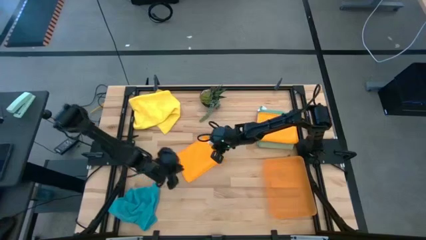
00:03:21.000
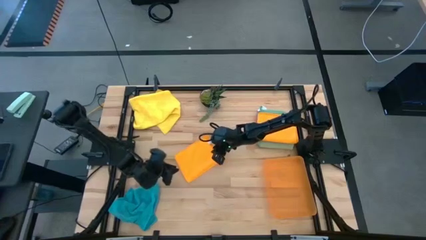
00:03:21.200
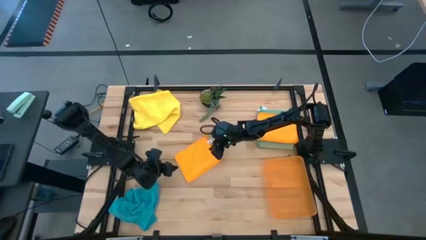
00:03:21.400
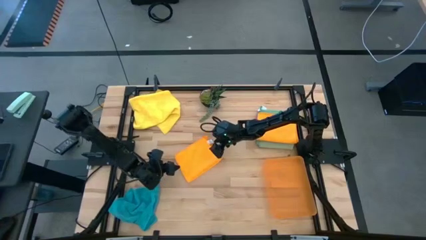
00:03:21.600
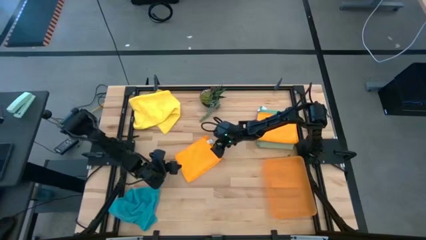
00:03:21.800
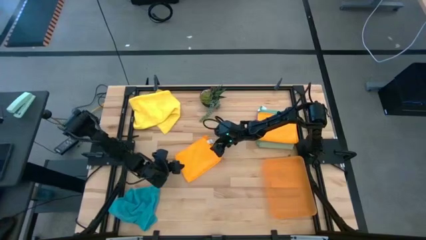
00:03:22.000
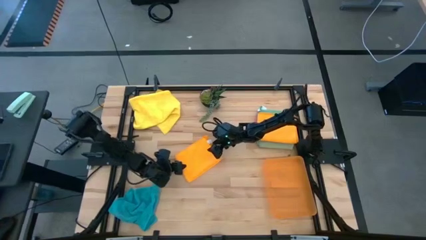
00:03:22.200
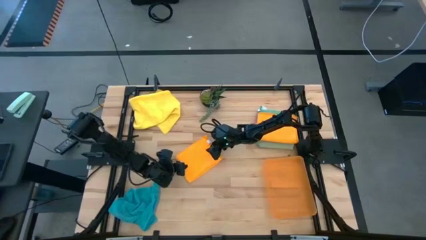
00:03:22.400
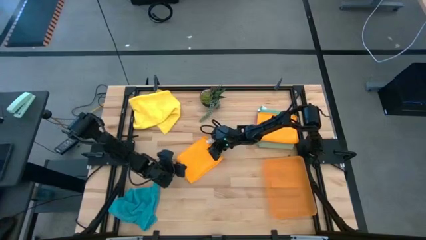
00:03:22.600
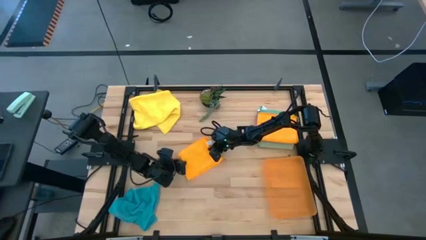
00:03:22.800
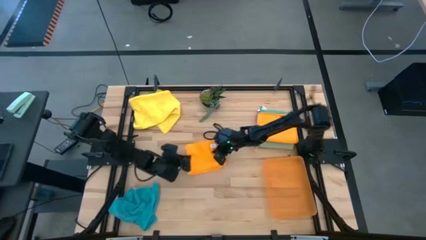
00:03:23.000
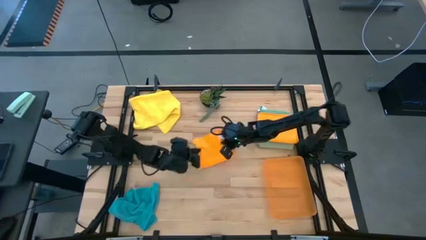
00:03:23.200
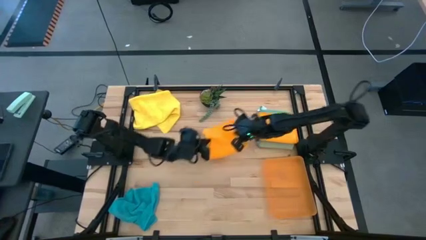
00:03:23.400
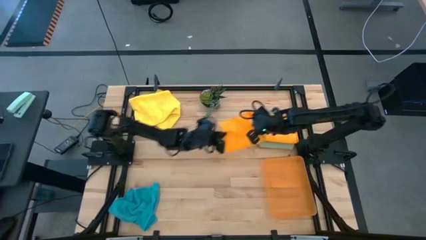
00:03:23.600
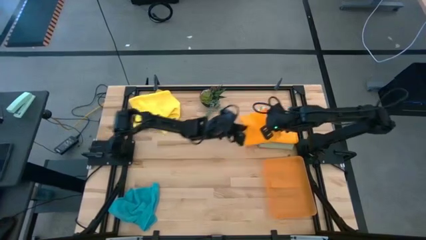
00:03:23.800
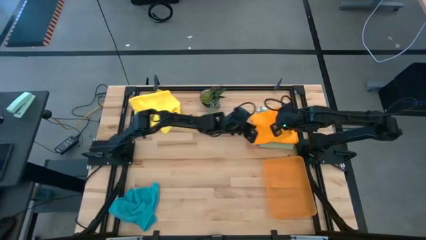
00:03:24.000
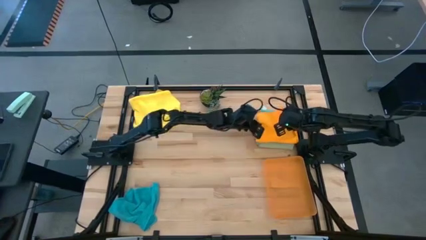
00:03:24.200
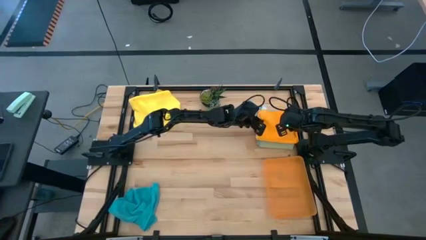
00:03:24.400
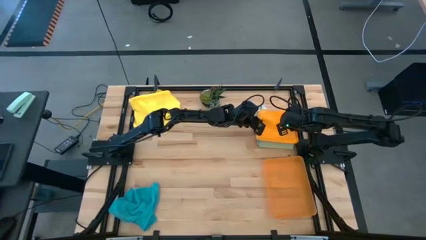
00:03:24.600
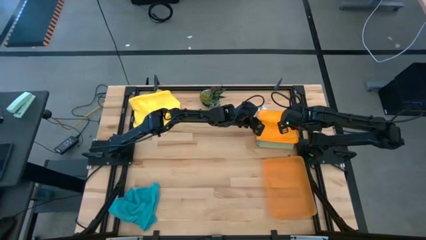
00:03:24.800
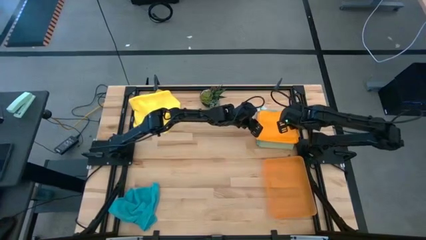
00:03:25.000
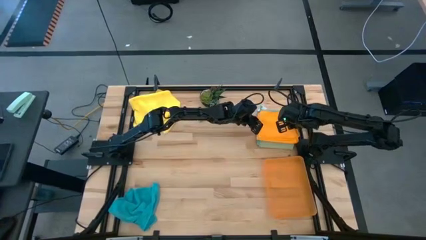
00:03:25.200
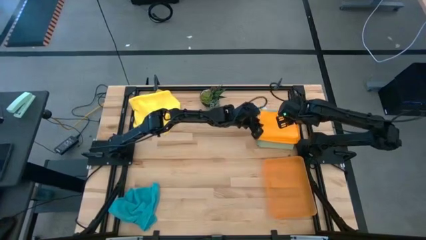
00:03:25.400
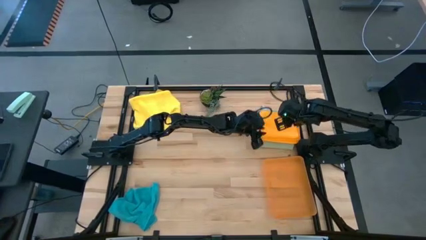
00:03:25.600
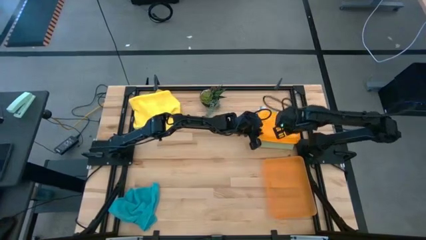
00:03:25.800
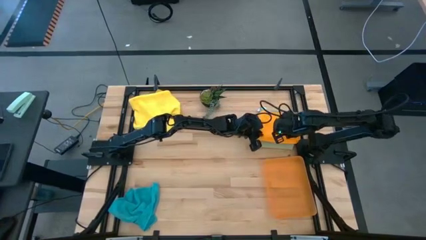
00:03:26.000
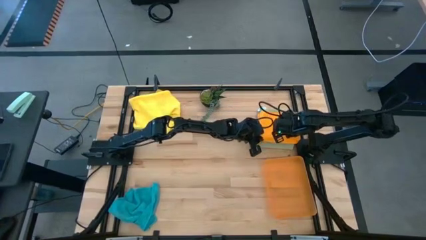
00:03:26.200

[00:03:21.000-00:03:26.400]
Task: Fold microfiber towels
Stack the orange microfiber towel on top of the other orange microfiber towel

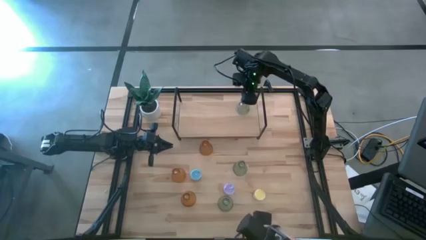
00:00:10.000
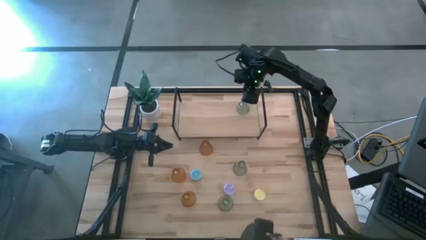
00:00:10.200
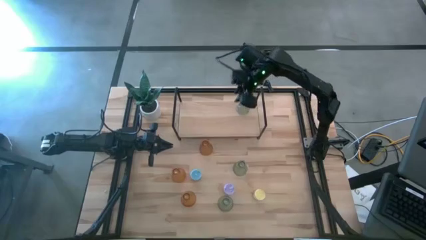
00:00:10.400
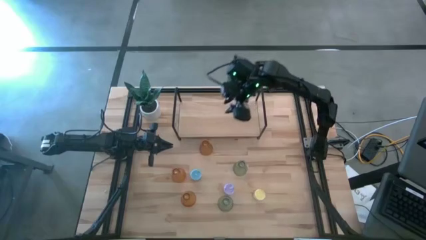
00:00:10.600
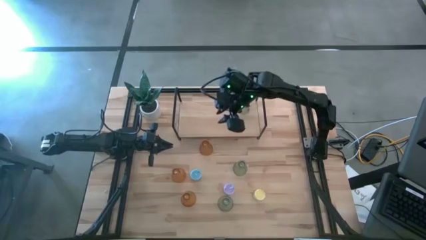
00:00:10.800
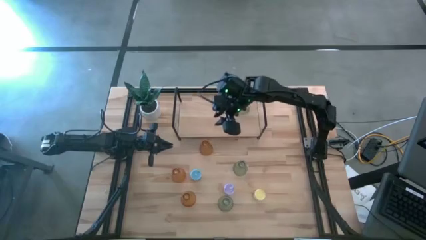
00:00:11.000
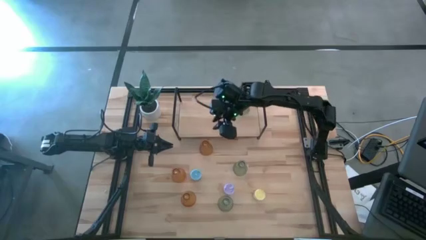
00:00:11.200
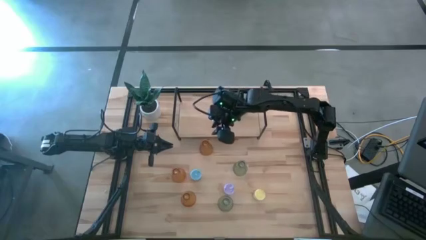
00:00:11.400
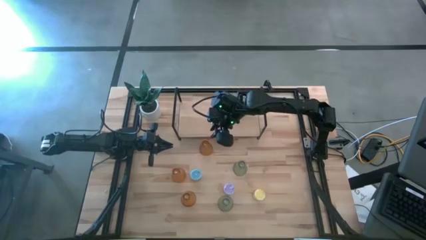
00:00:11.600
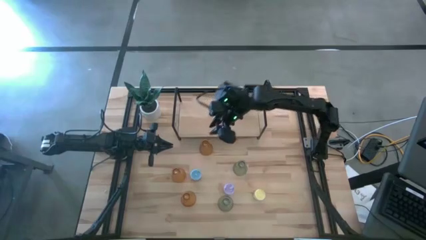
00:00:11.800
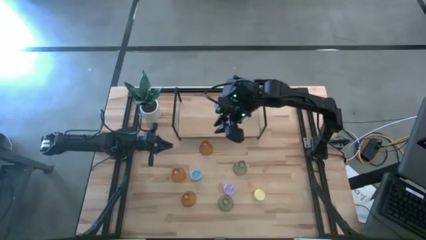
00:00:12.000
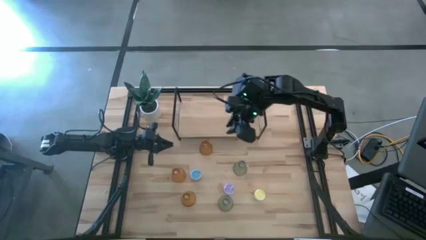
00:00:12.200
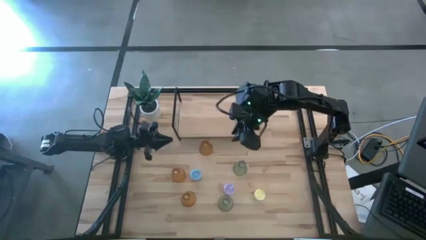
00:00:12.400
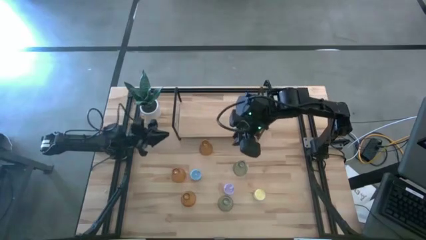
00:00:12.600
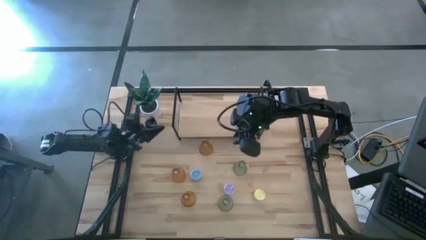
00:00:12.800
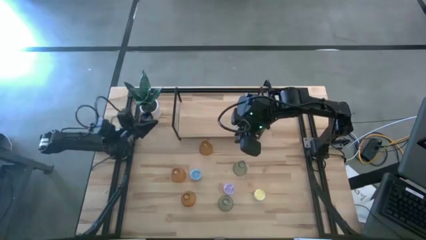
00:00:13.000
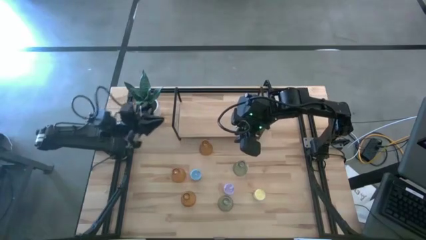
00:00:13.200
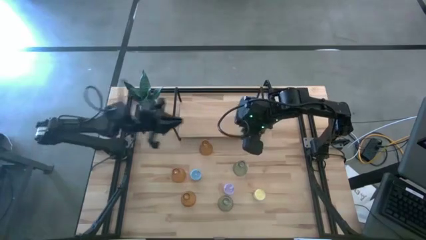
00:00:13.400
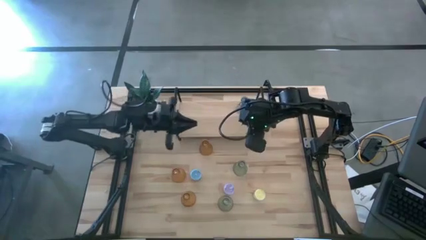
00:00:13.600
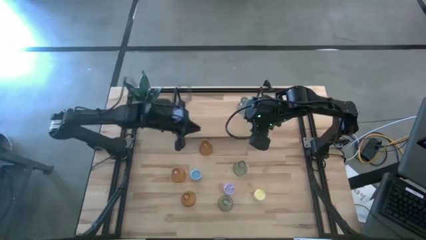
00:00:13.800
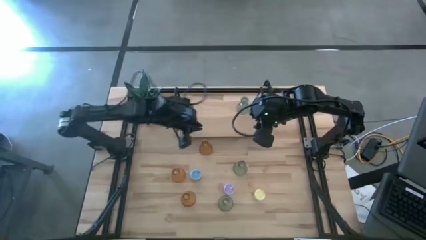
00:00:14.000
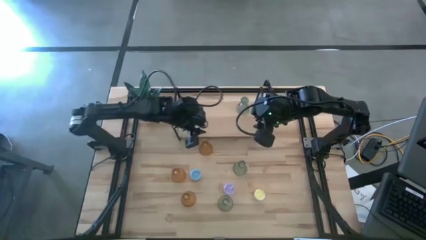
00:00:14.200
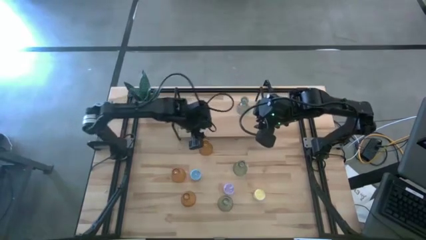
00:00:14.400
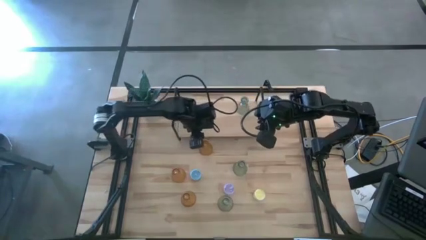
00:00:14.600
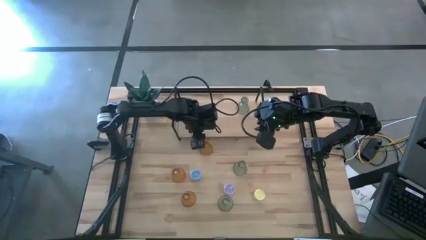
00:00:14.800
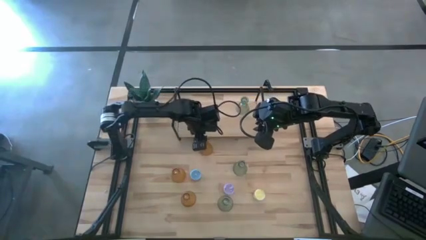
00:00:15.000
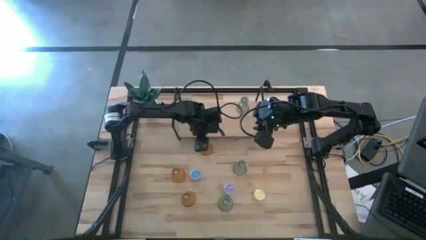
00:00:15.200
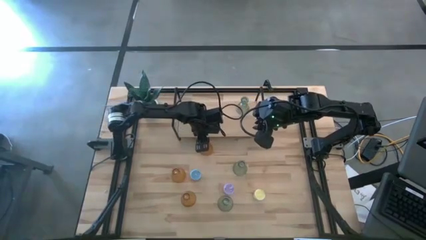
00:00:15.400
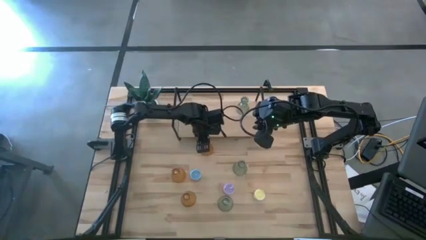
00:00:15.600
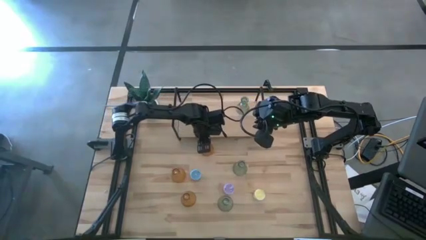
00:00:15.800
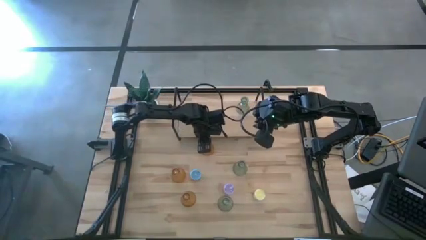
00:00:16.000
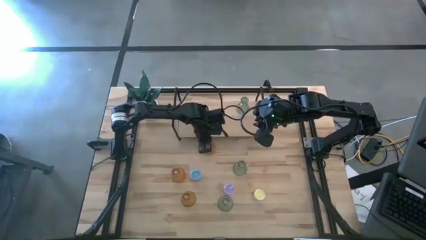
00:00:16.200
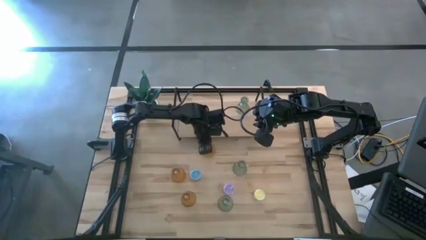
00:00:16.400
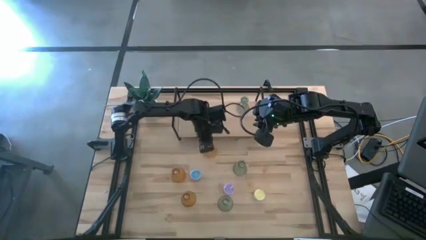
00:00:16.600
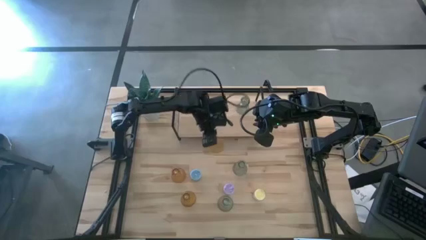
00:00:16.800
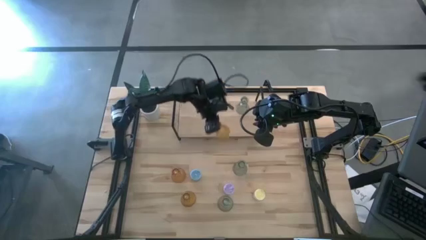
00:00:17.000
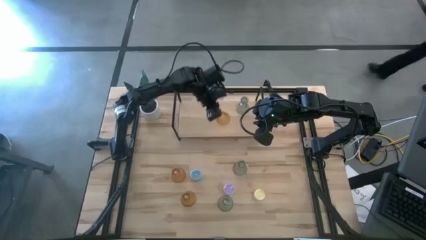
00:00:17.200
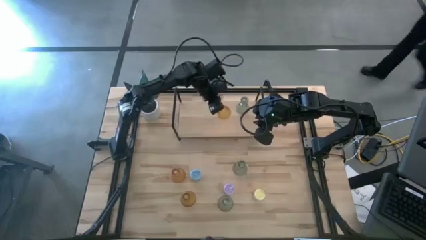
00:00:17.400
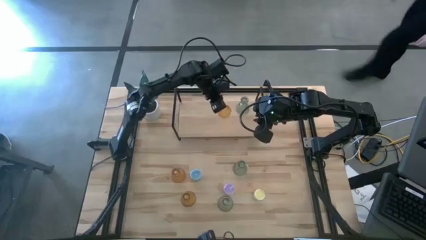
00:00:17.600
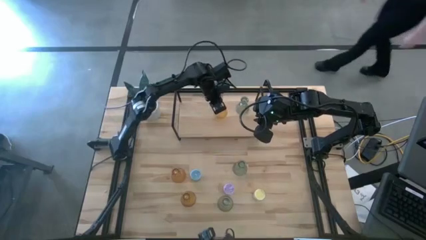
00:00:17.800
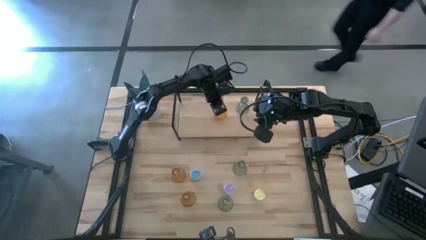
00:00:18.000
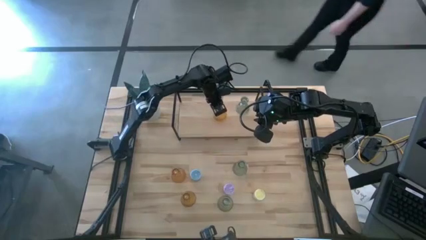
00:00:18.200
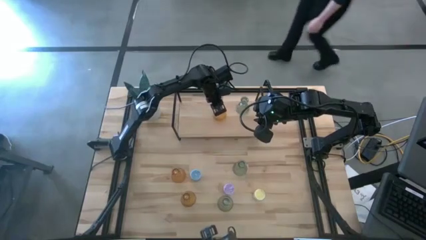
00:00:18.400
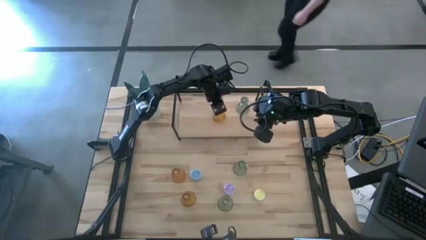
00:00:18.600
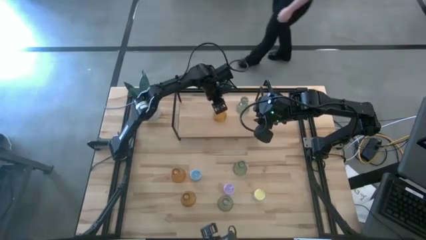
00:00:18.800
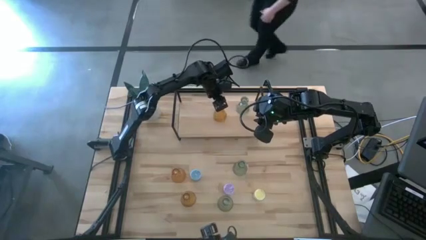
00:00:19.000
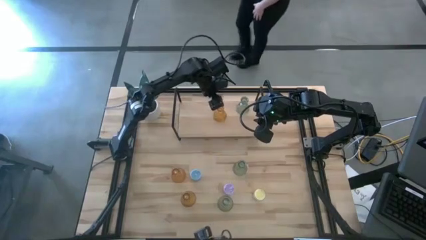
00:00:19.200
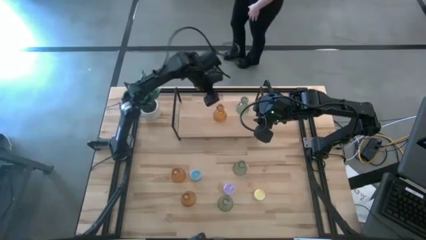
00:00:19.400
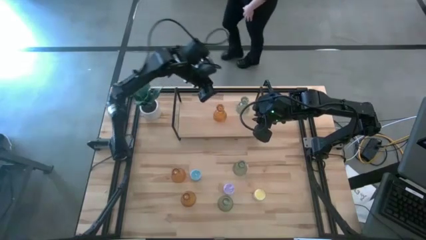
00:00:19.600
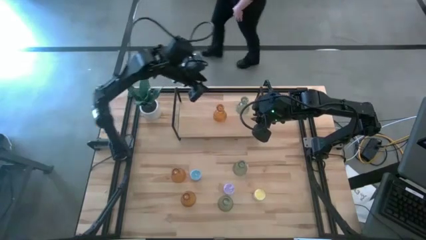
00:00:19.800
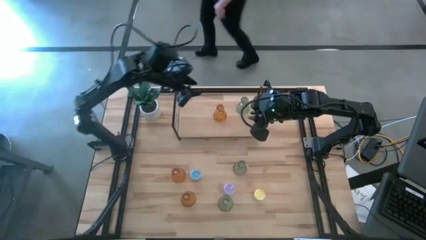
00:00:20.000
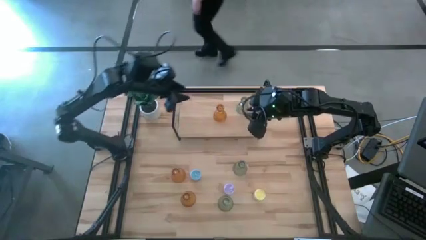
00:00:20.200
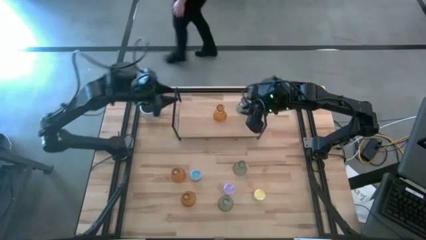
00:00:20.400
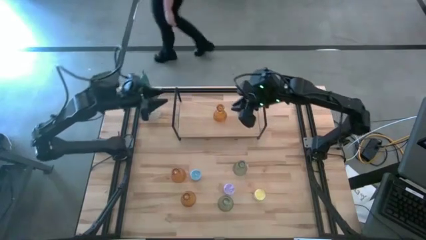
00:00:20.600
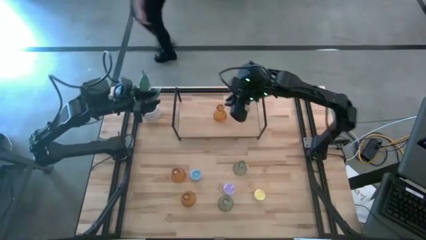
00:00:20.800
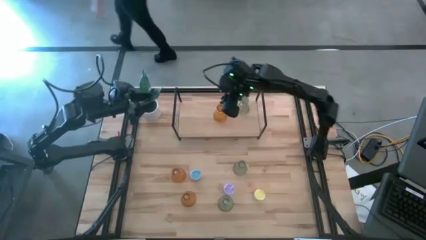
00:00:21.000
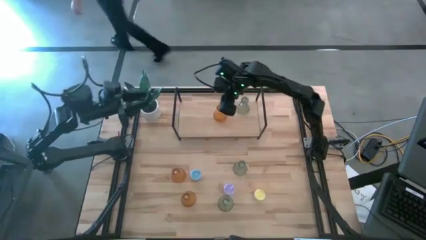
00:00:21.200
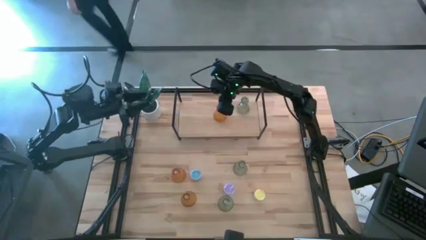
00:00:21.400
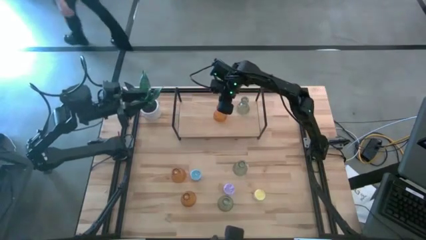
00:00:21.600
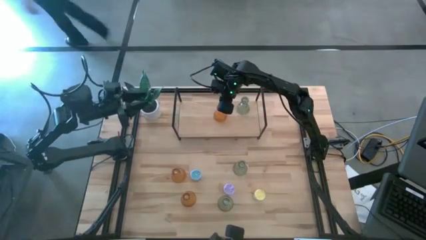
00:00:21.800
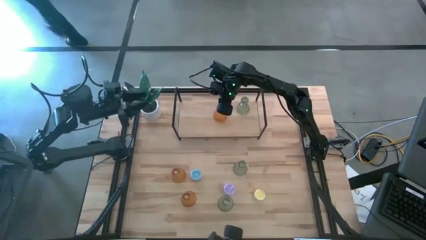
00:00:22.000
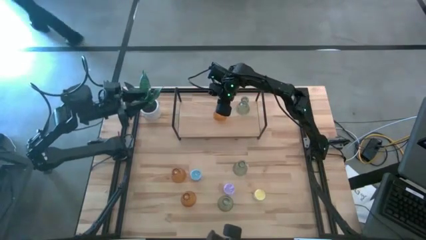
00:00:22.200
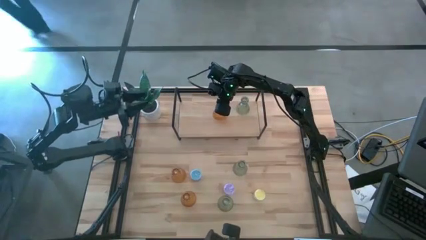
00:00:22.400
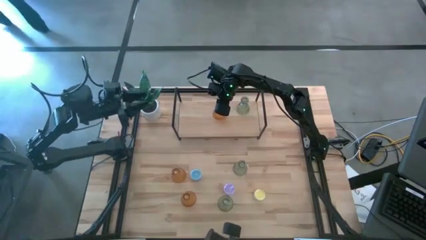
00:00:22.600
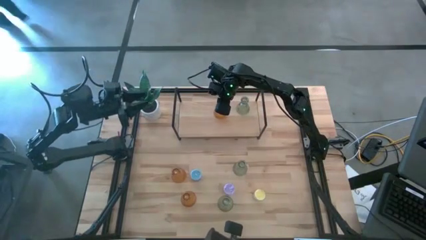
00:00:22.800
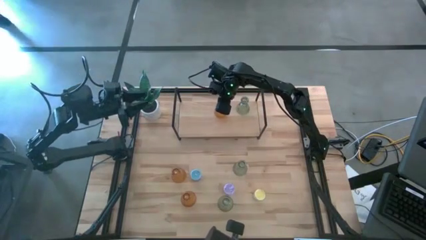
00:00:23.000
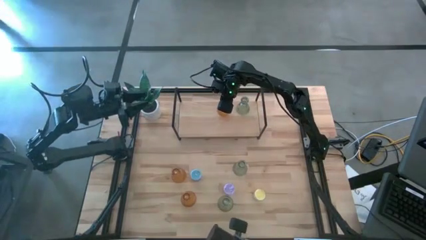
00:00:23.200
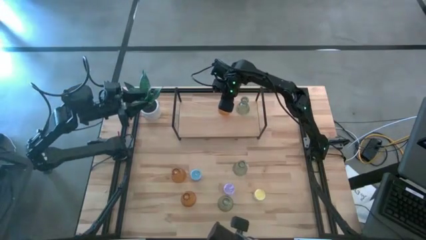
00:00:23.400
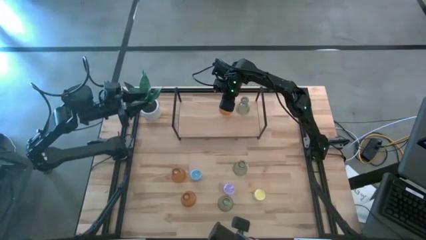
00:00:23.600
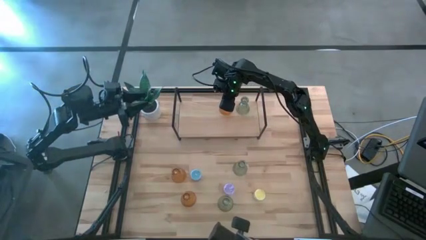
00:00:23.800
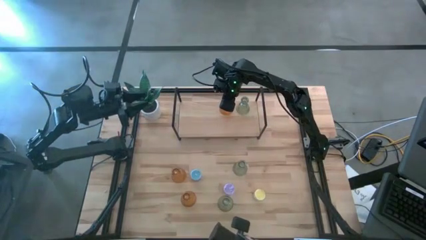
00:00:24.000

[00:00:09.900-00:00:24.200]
Task: Pick & Place candle stick holders
Put the top yellow glass candlestick on the shelf
